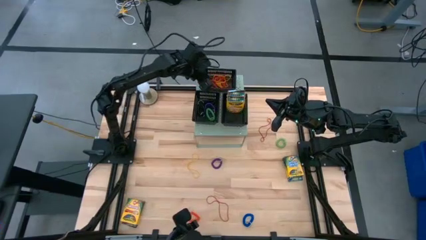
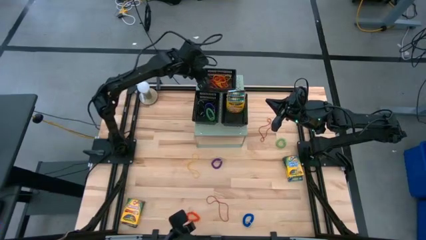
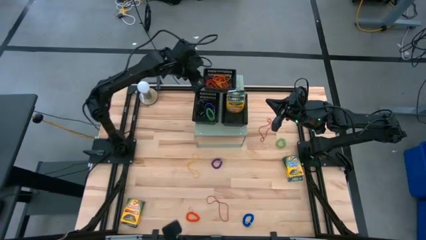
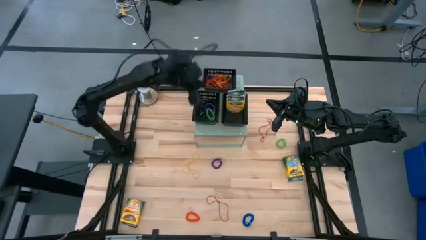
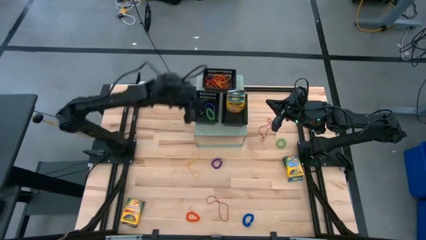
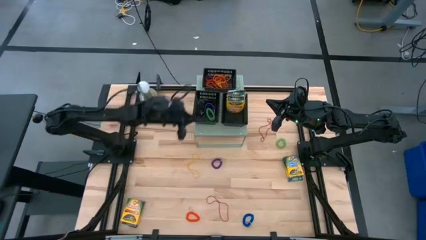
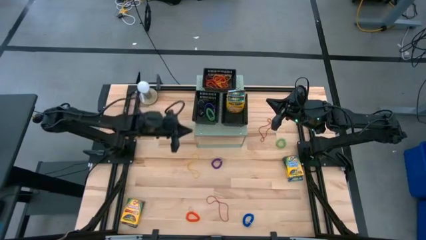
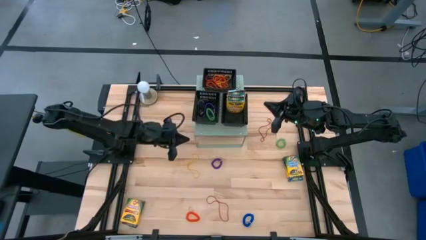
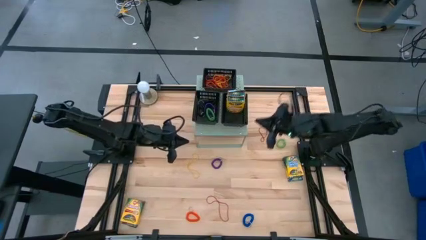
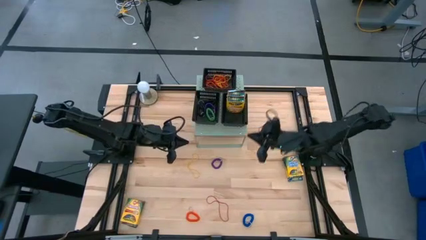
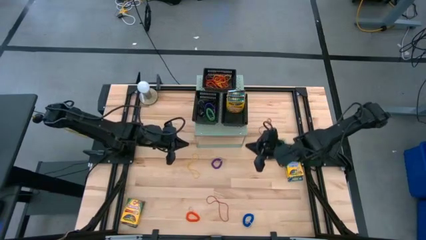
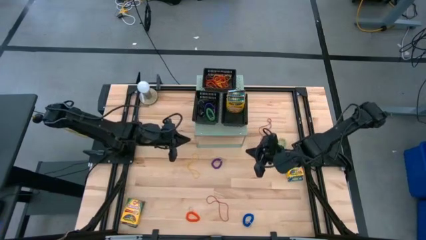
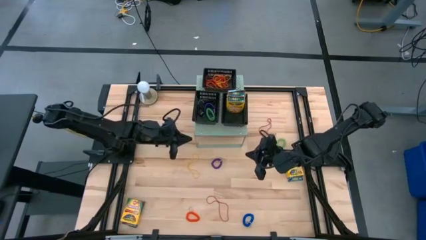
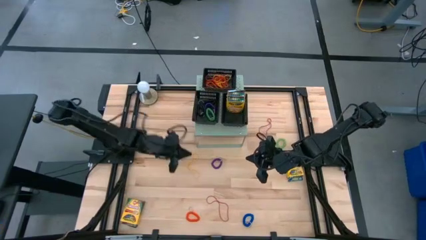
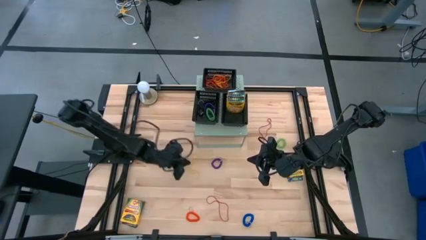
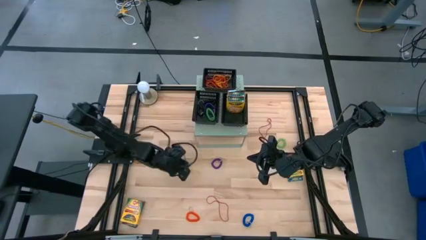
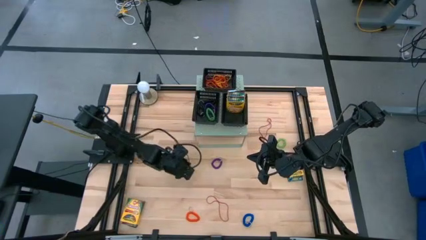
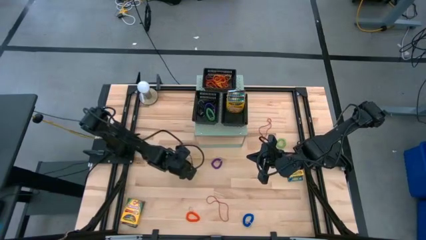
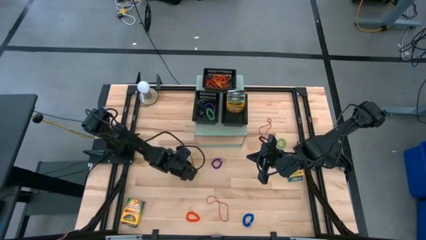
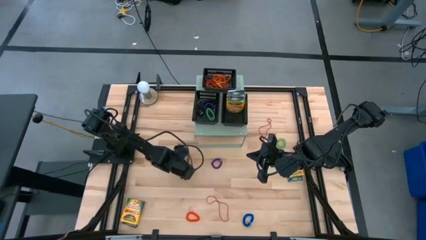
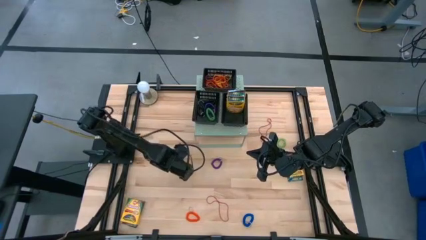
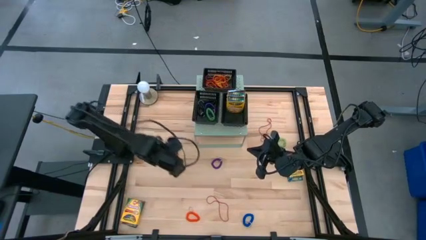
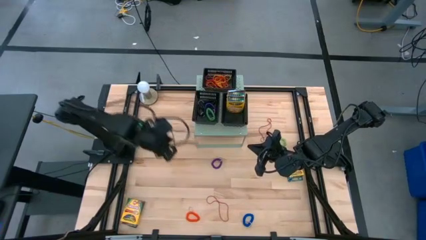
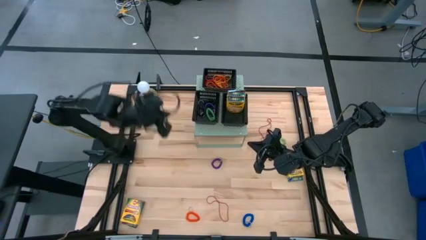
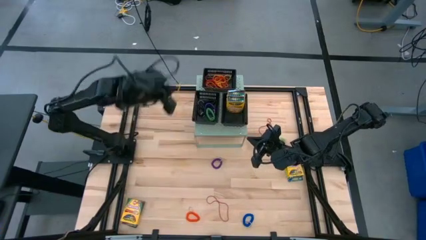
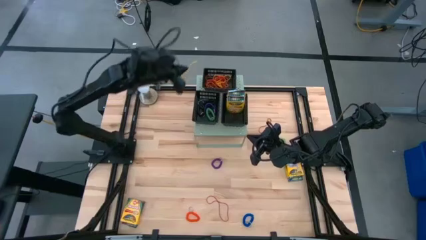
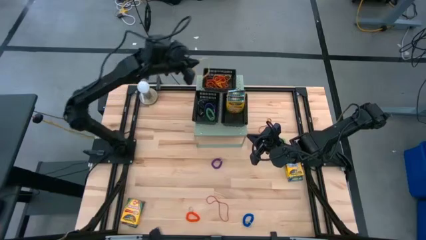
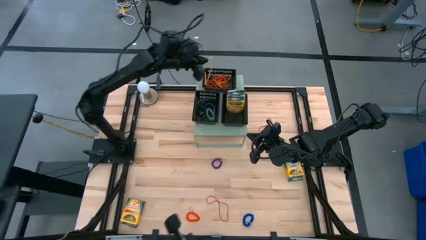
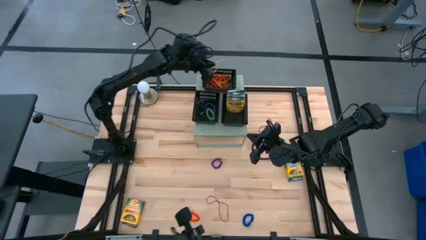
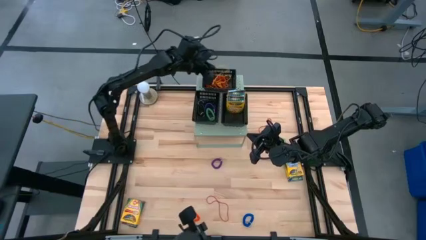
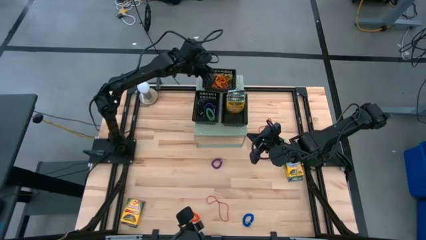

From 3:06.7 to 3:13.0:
Task: Pick & Place Office Desk Supplies
Put the yellow rubber band into the top black bin

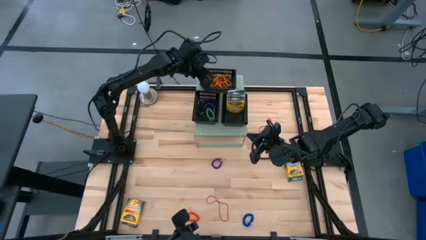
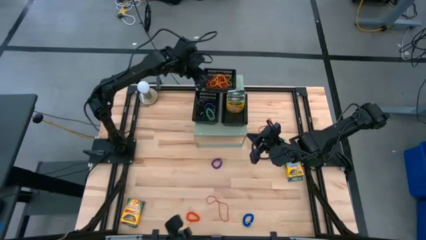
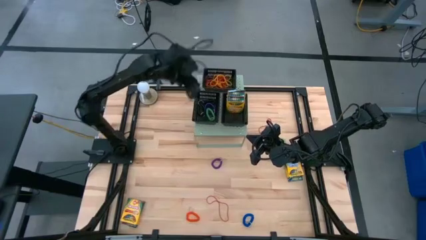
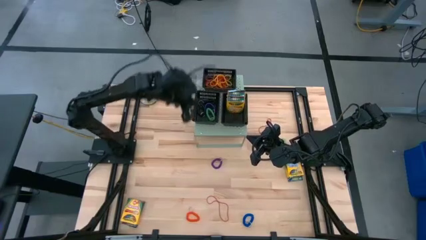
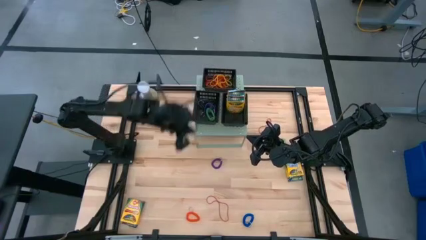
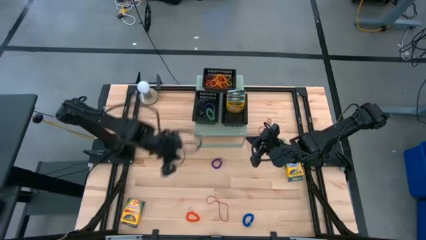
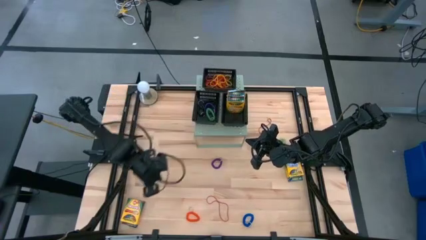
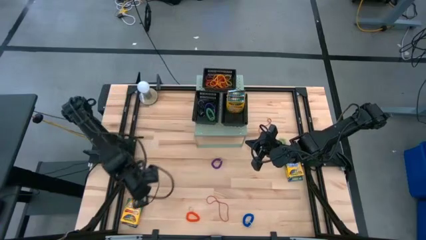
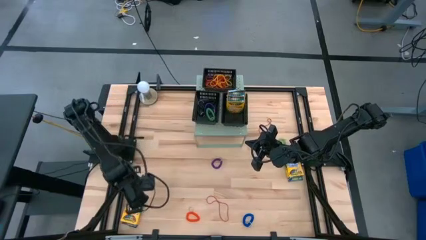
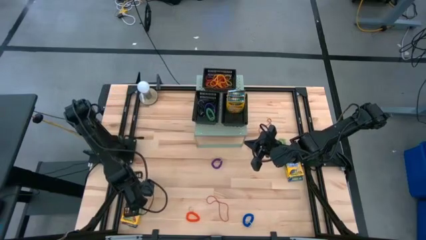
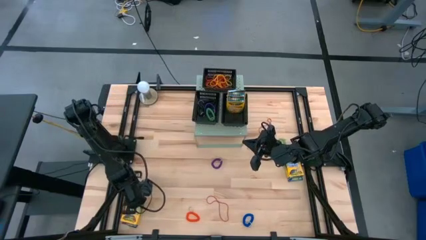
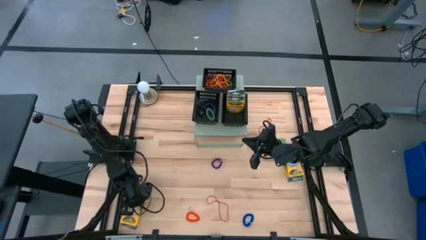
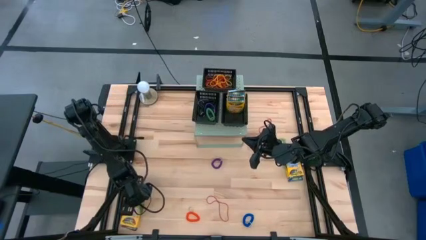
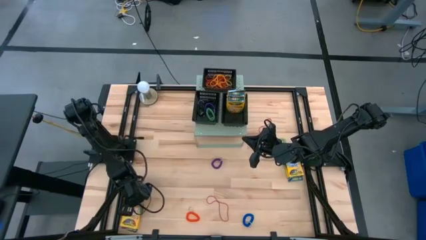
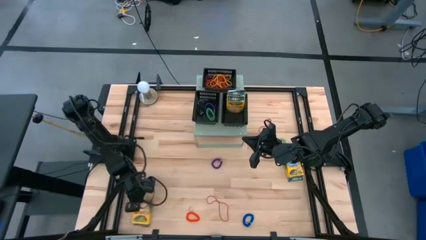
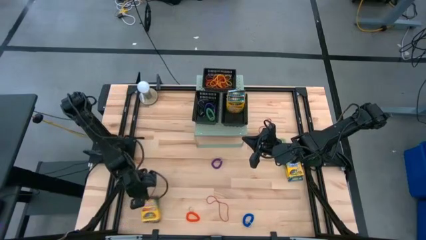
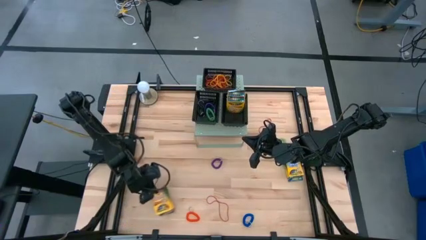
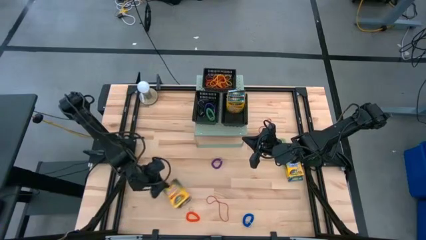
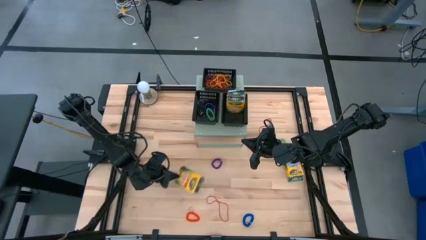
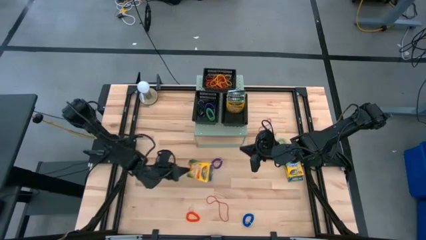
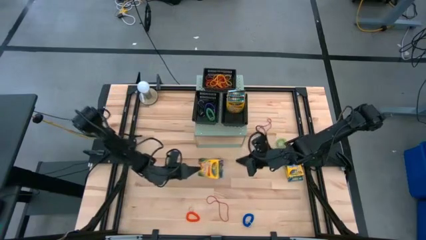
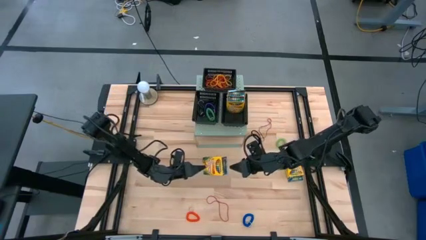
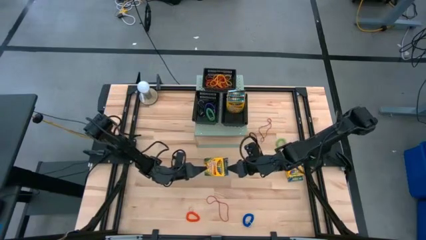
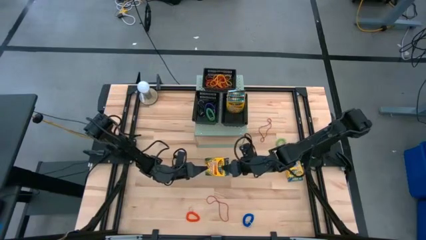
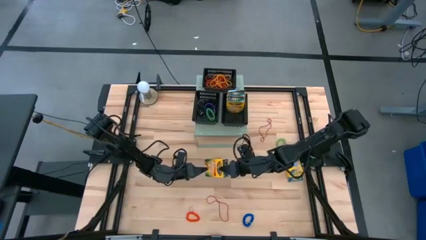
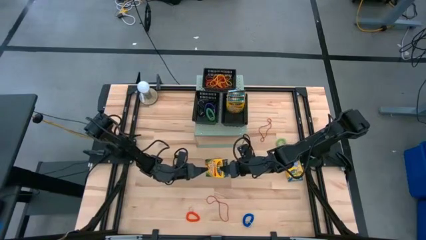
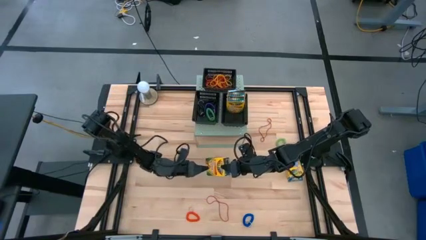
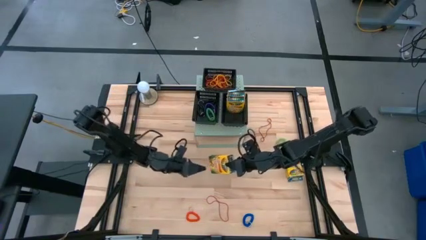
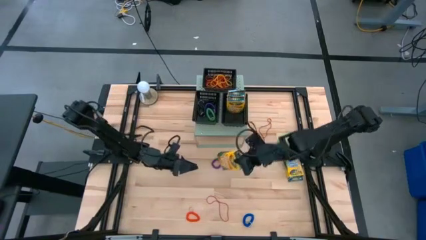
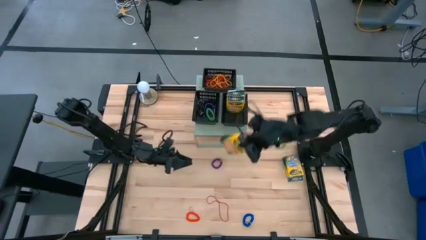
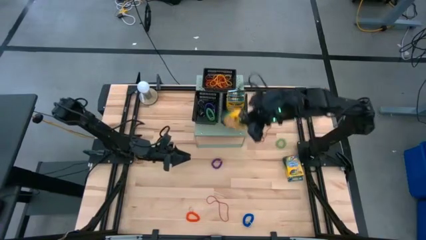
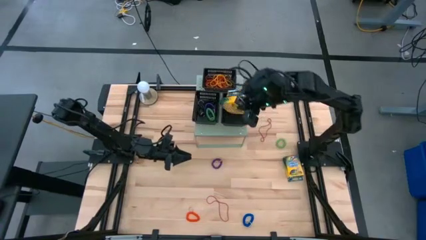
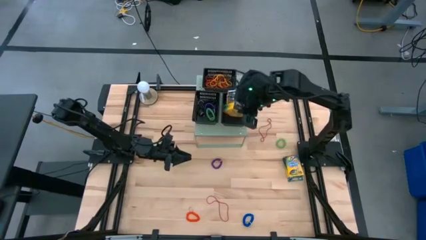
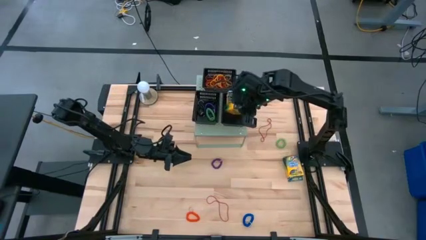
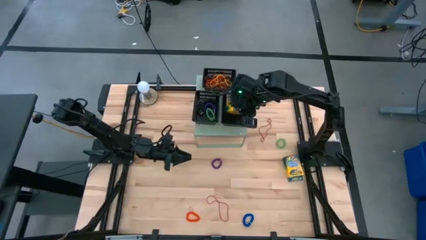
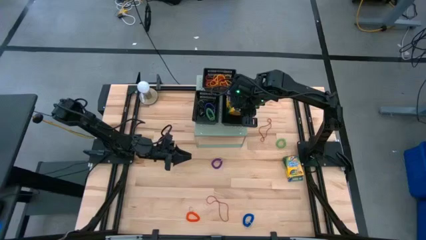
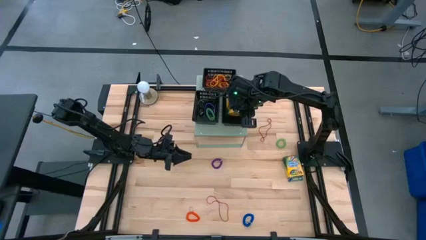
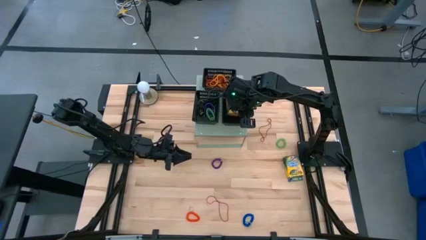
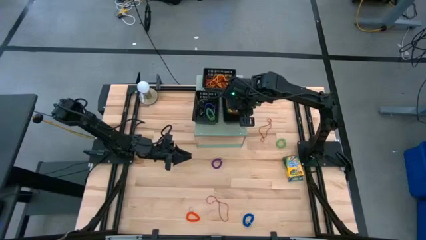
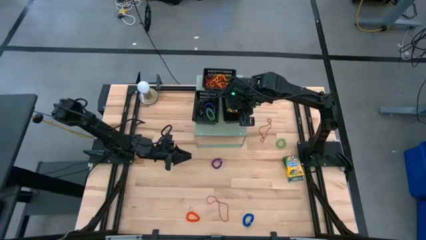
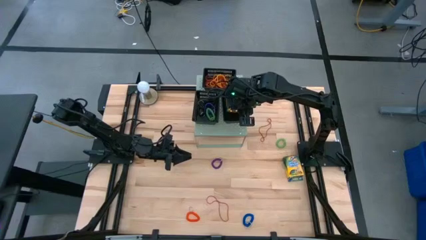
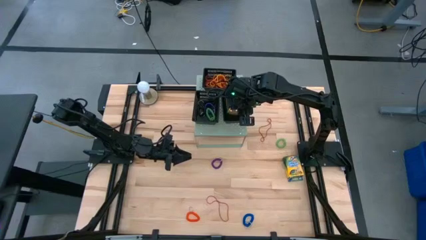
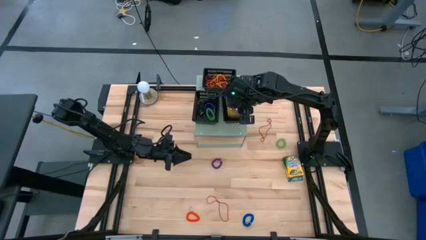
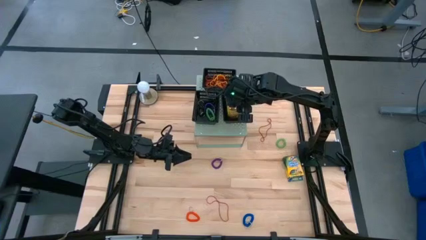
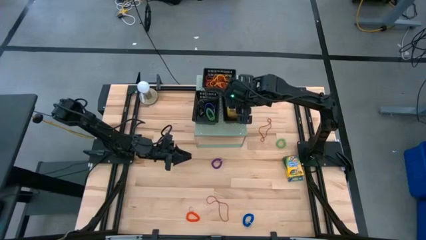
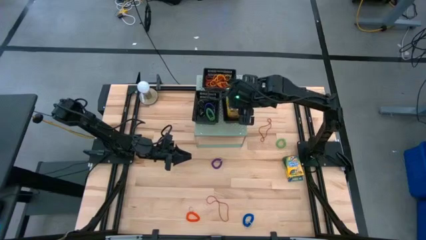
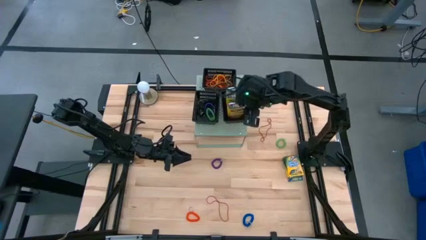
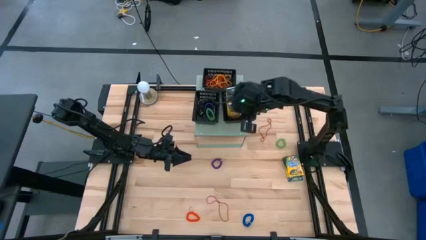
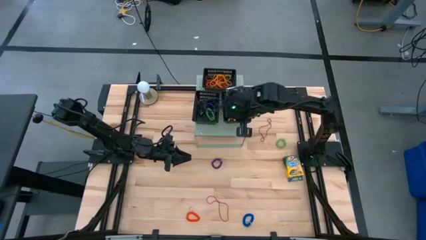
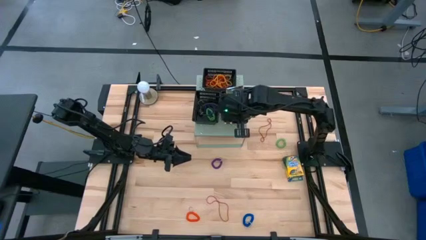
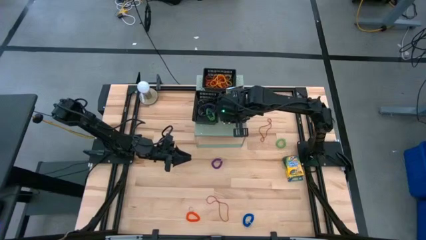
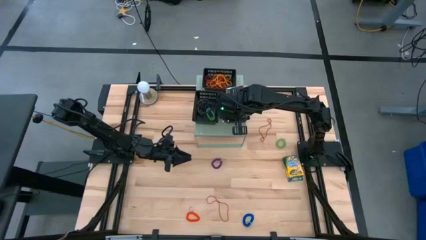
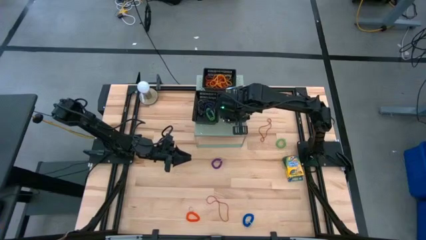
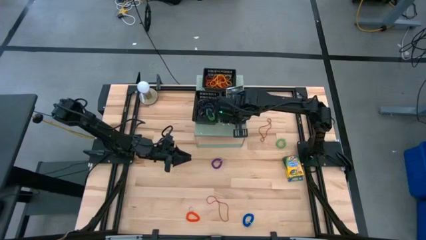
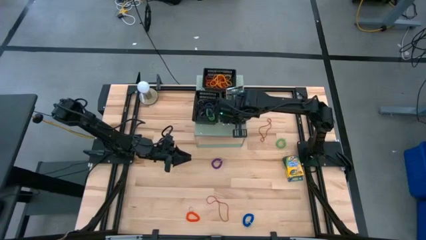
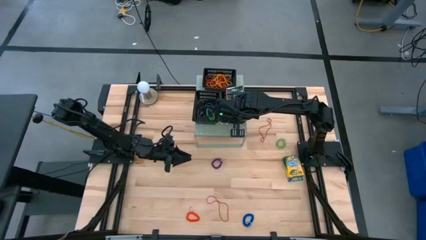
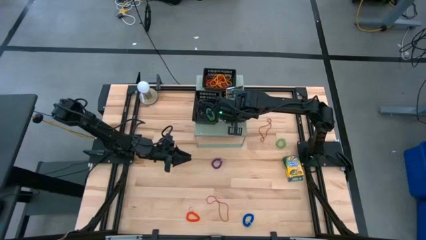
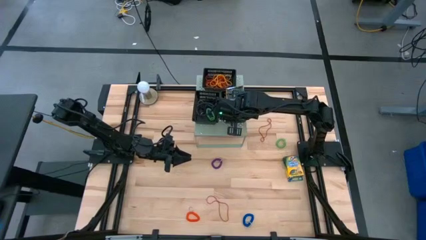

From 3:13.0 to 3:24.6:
Put the yellow crayon box into the bottom right black bin

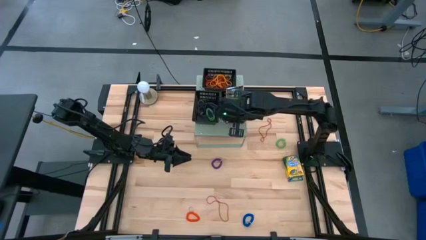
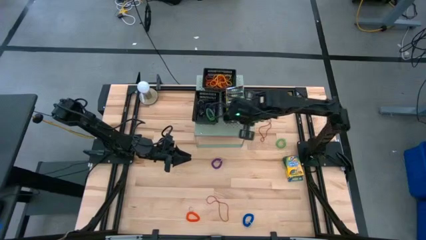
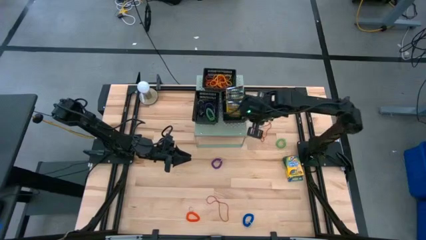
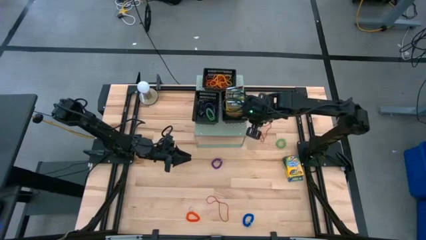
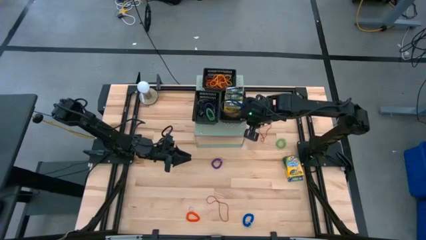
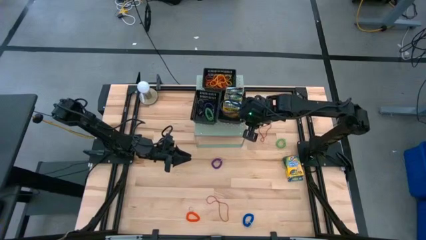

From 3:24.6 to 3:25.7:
Adjust the bottom right black bin
